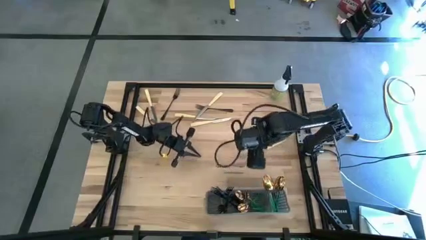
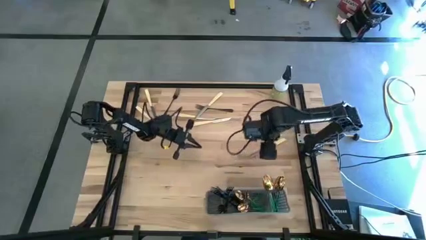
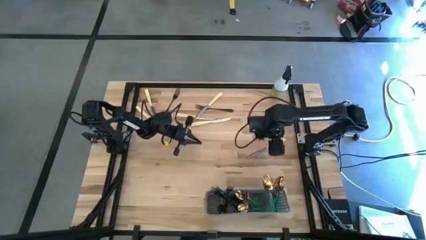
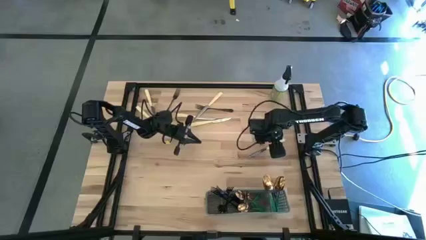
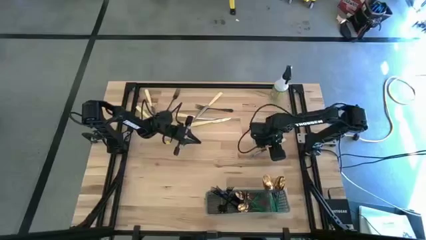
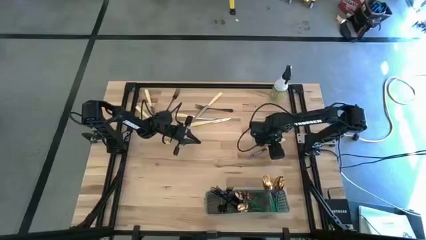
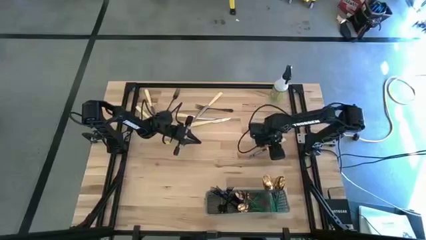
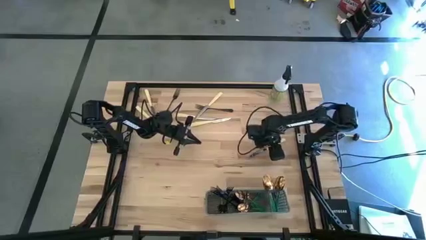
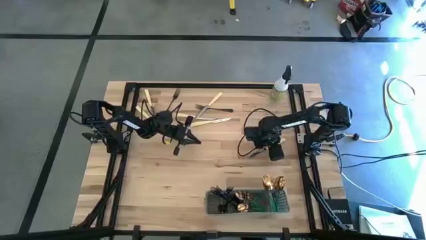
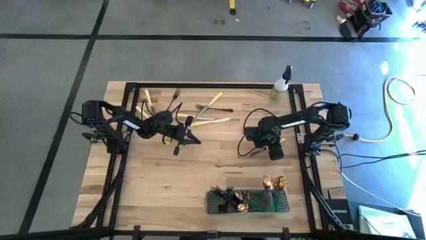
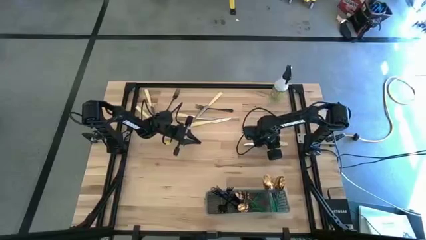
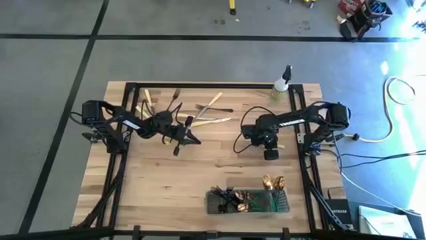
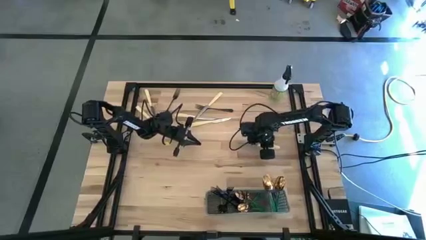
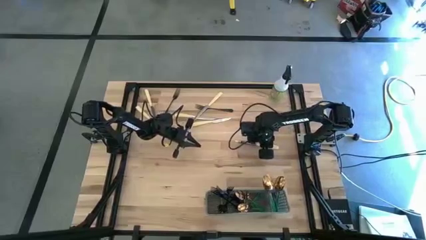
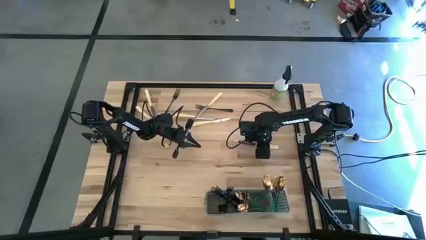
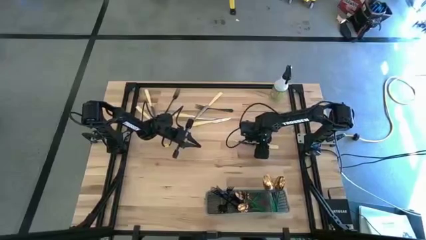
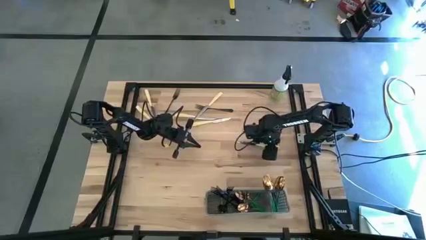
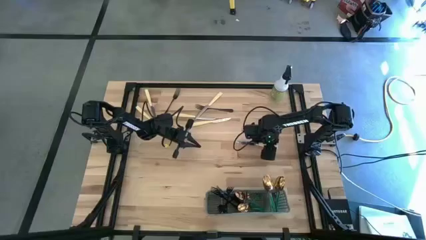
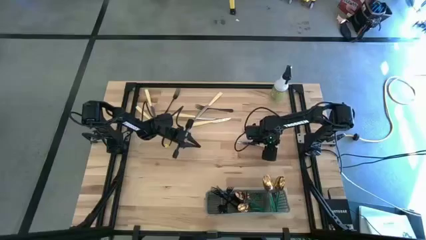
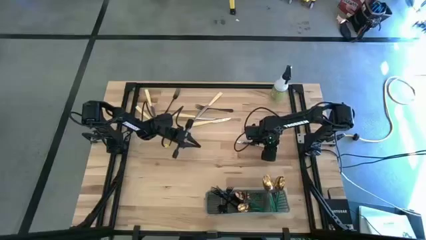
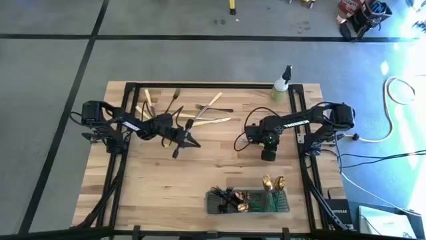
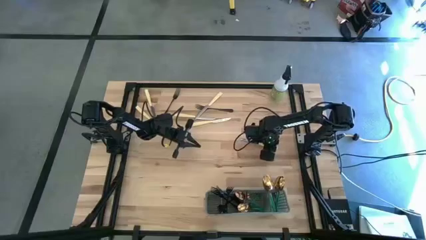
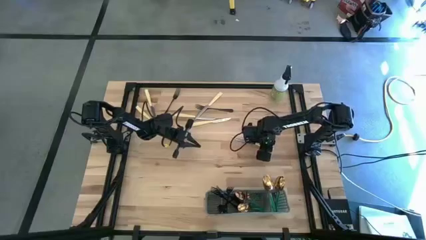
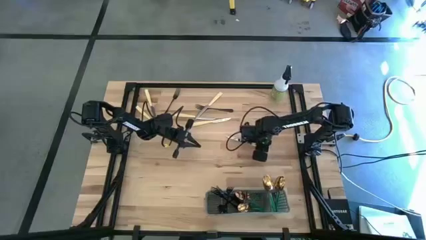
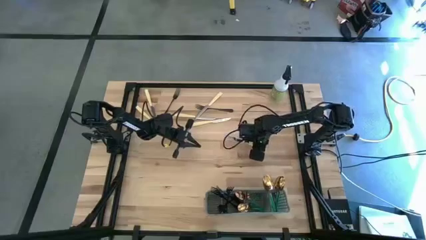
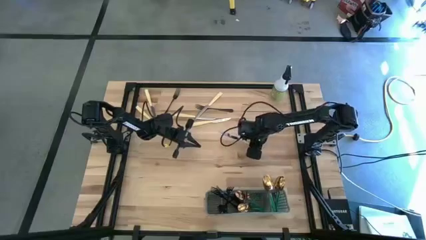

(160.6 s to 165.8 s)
Task: Sort silverware
Put the bottom yellow knife into the gray cutlery rack

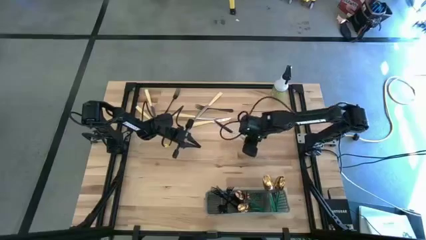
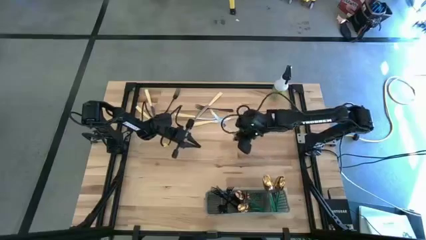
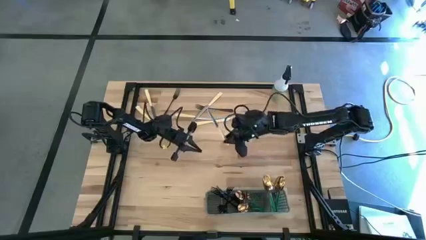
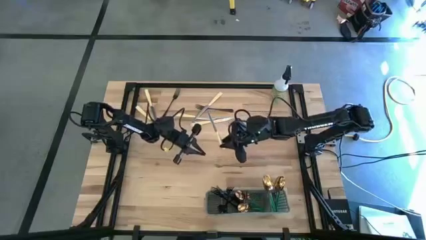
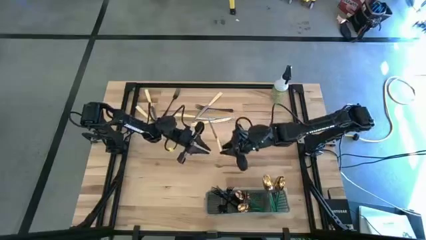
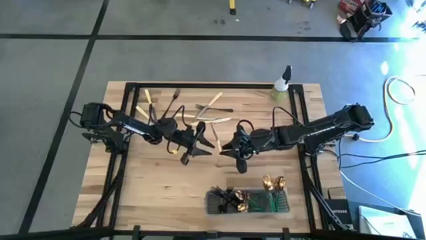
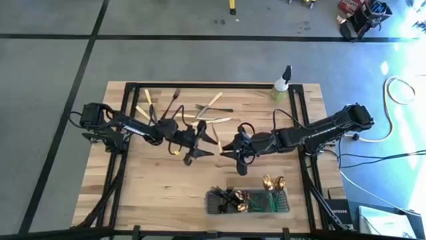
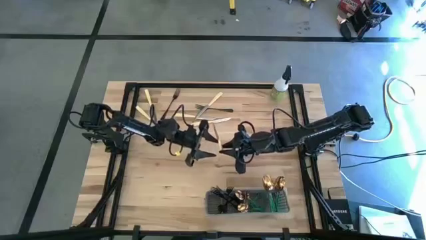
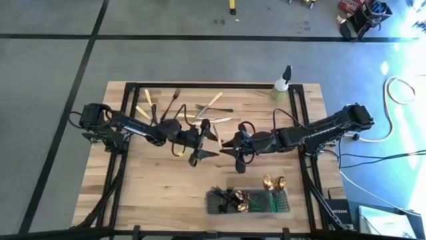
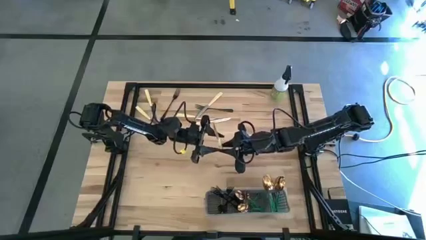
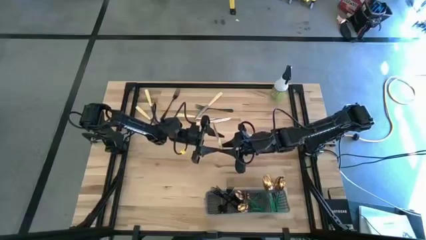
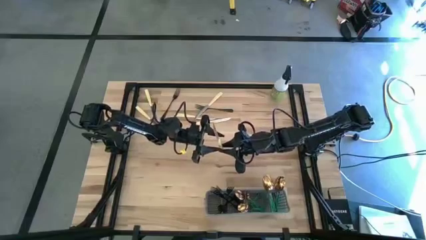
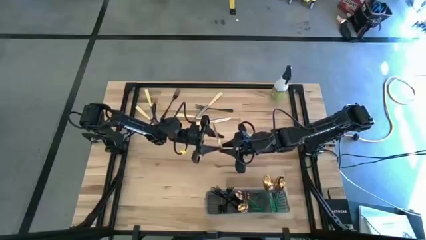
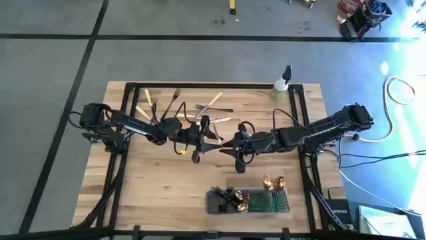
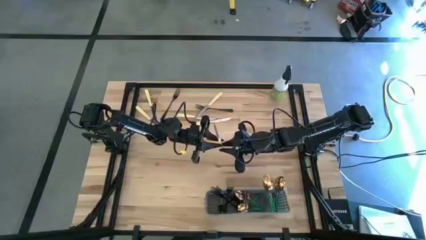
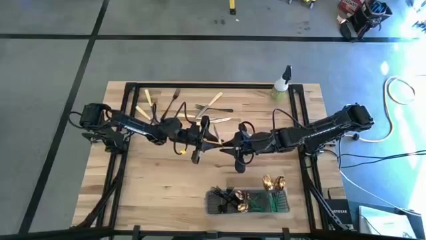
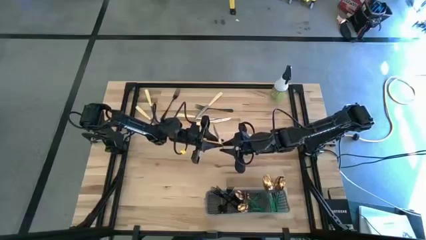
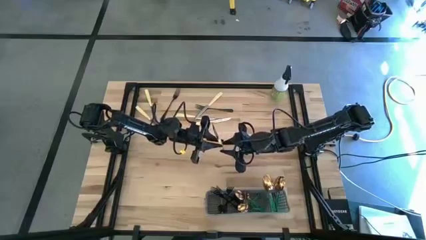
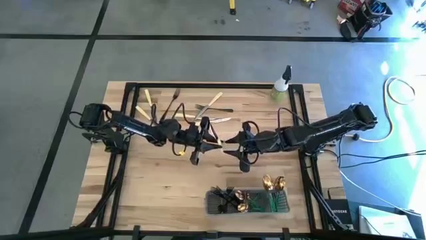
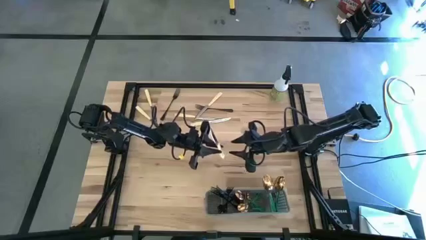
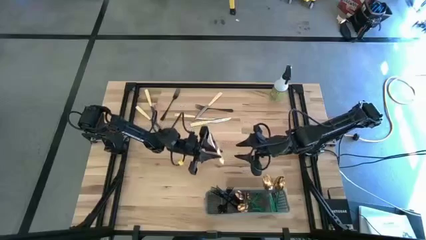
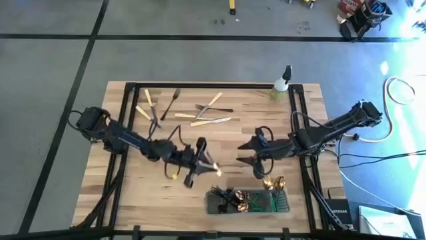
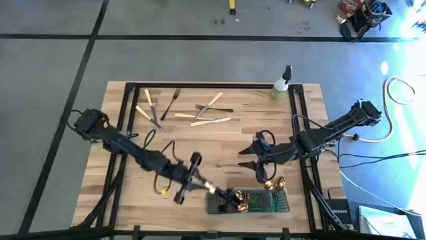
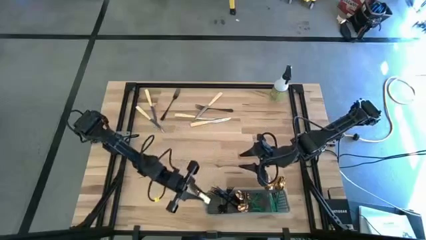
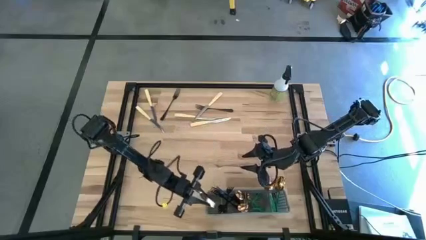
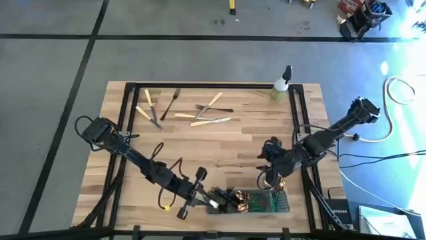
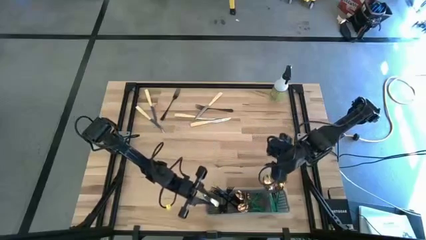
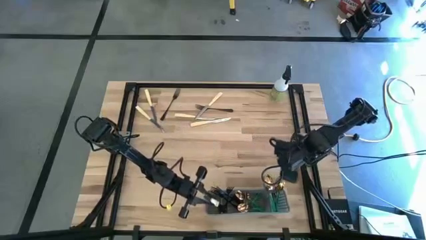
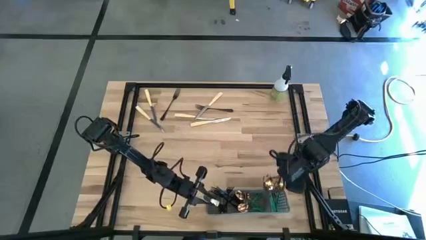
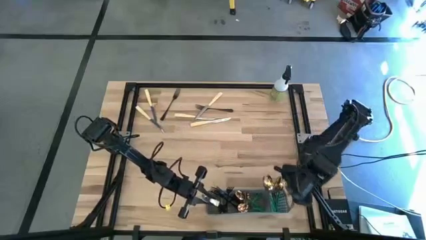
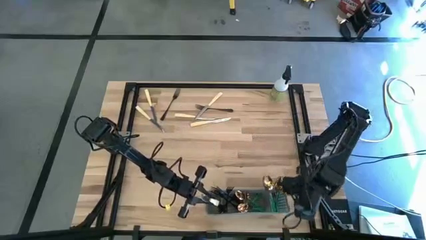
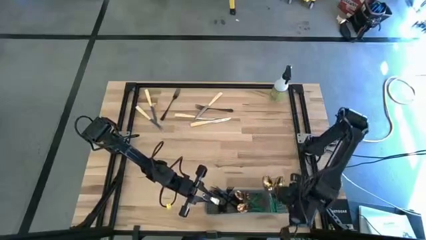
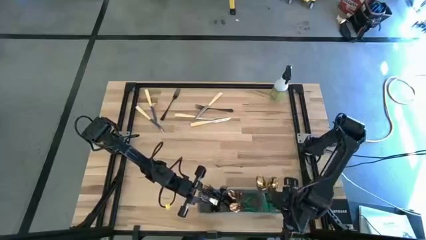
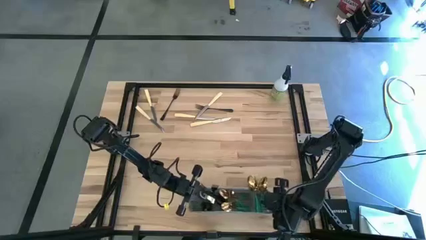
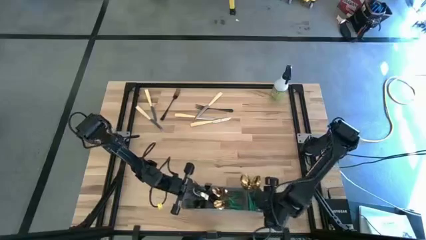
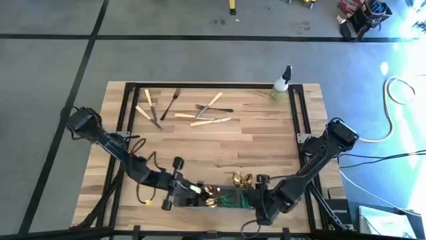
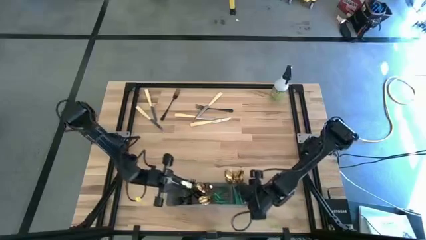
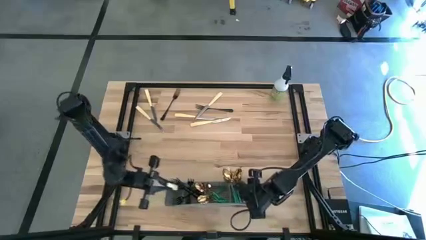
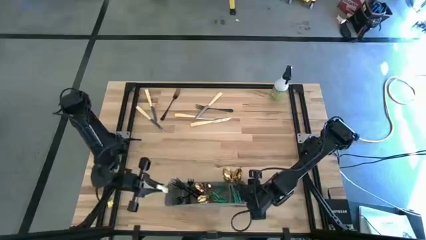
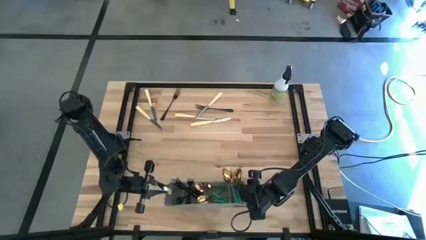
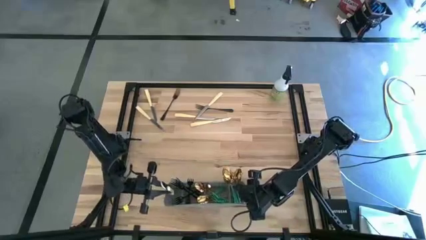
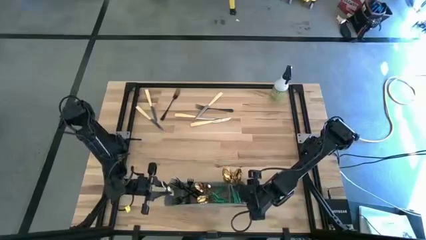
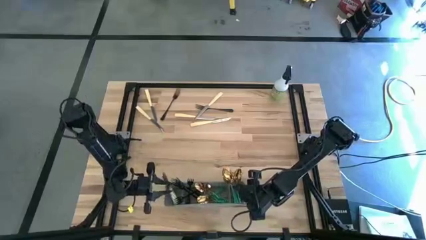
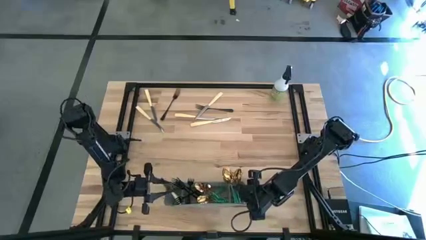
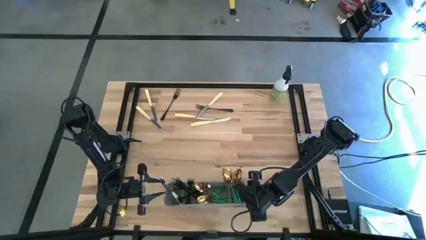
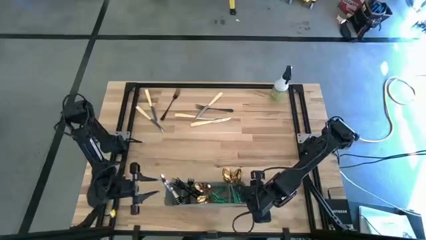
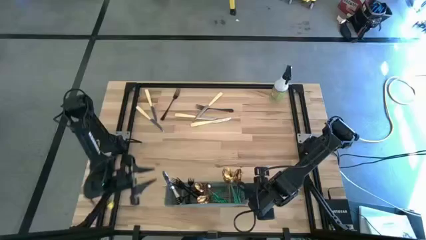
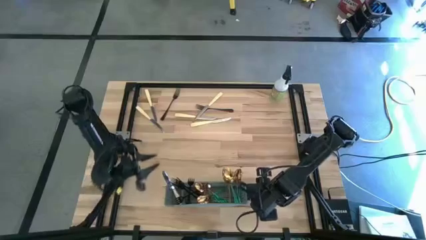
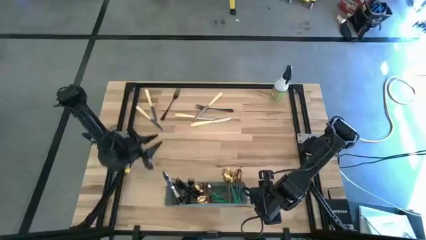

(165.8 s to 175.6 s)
Put the bottom yellow knife into the gray cutlery rack
